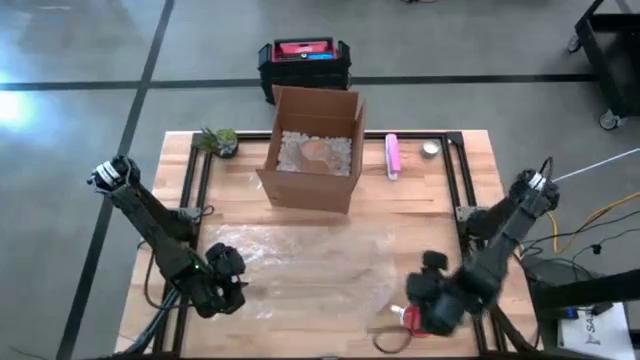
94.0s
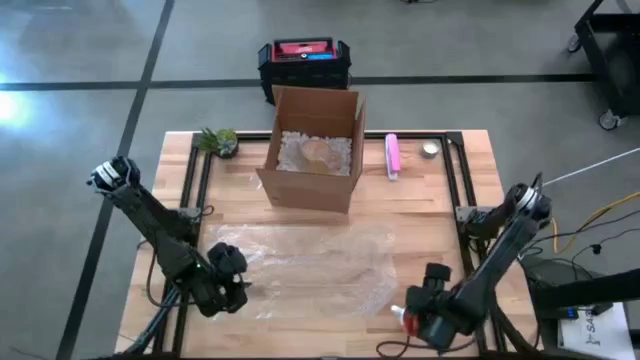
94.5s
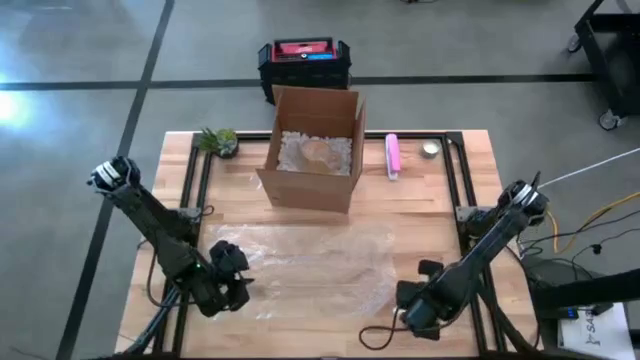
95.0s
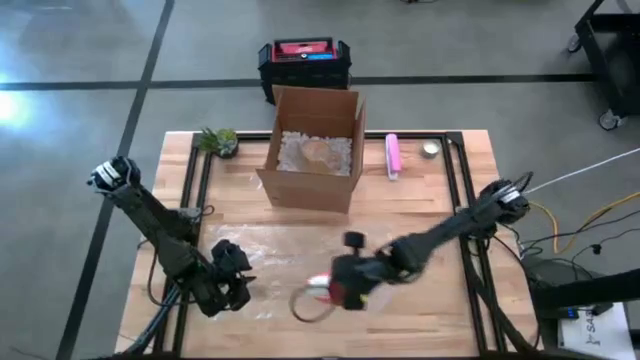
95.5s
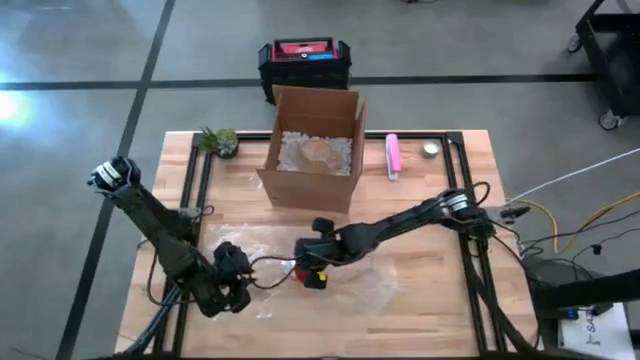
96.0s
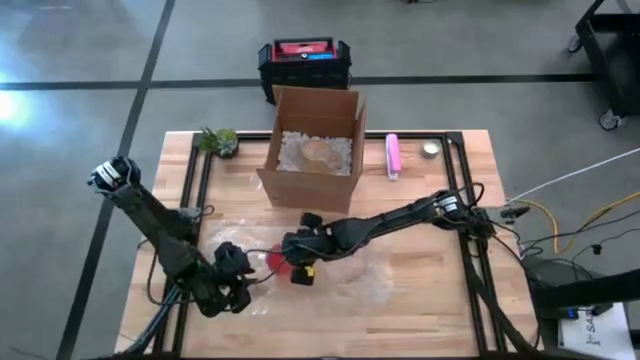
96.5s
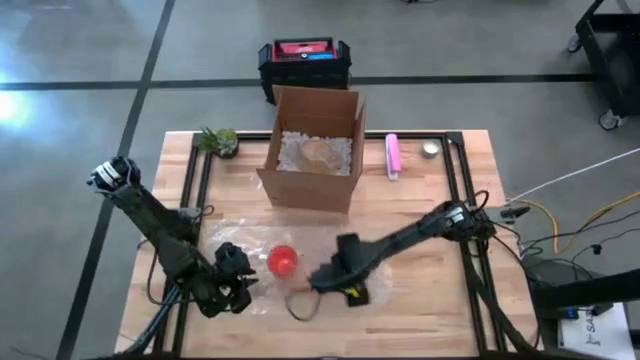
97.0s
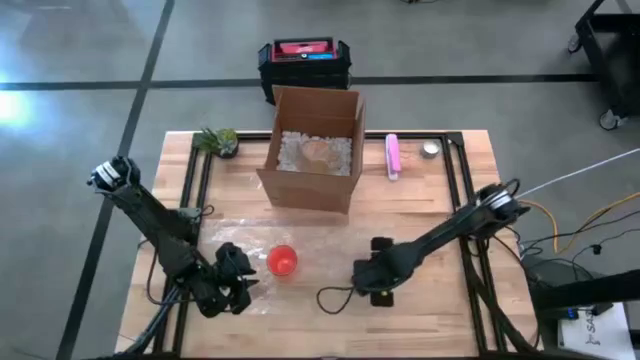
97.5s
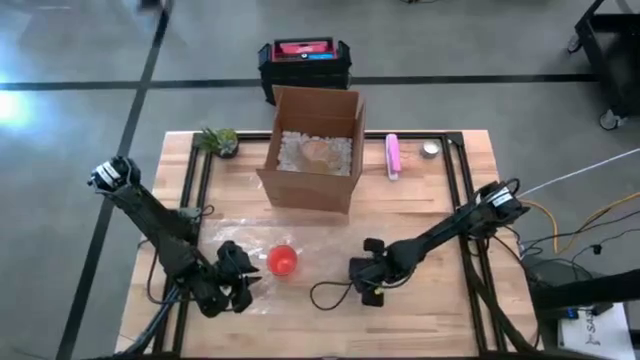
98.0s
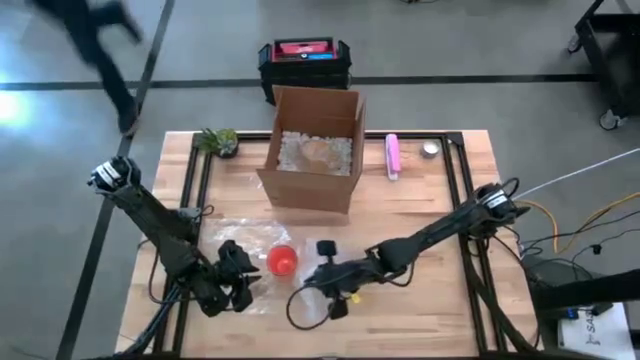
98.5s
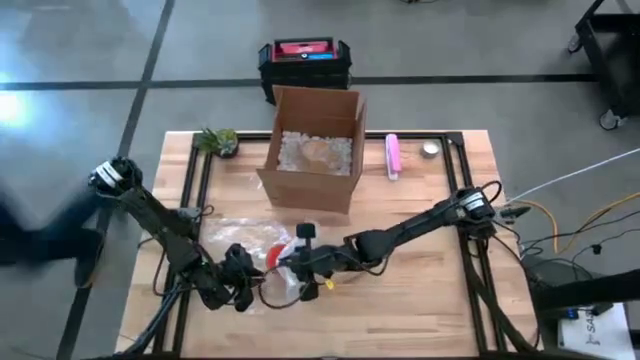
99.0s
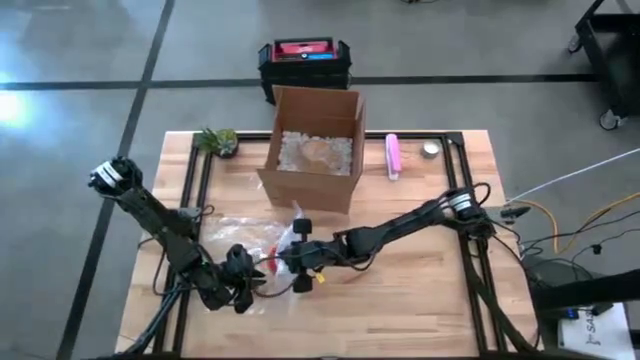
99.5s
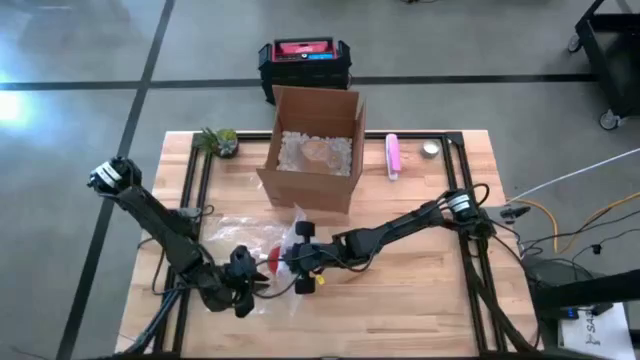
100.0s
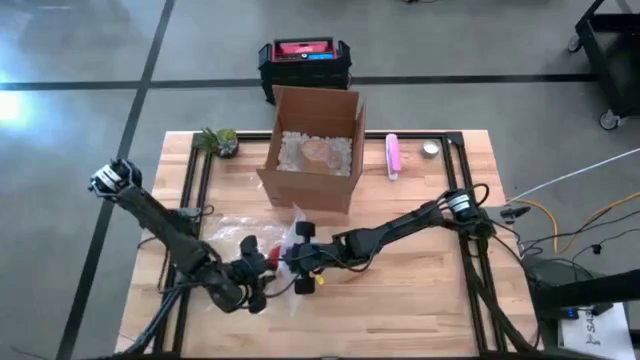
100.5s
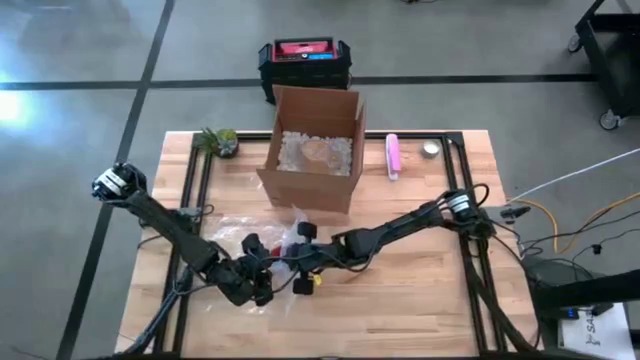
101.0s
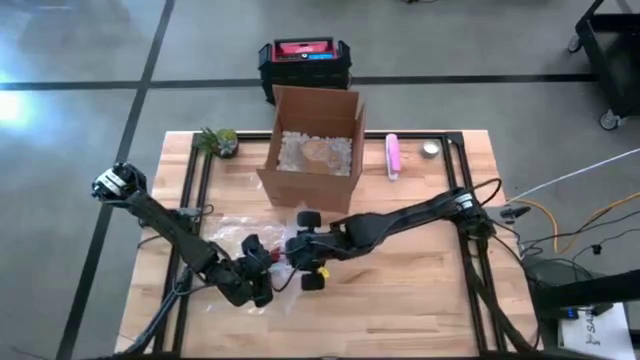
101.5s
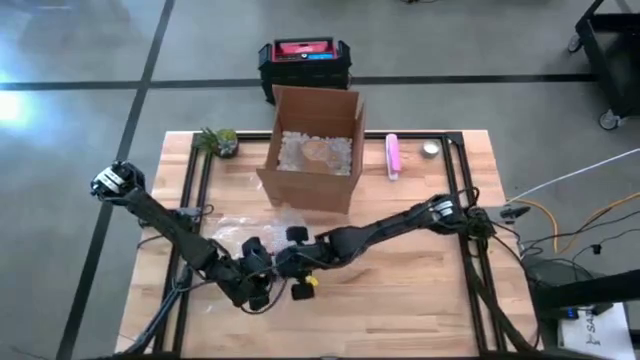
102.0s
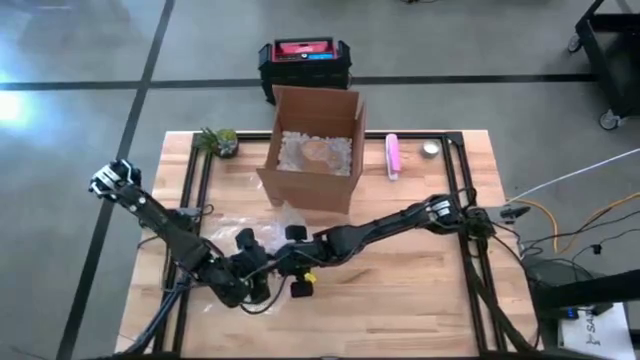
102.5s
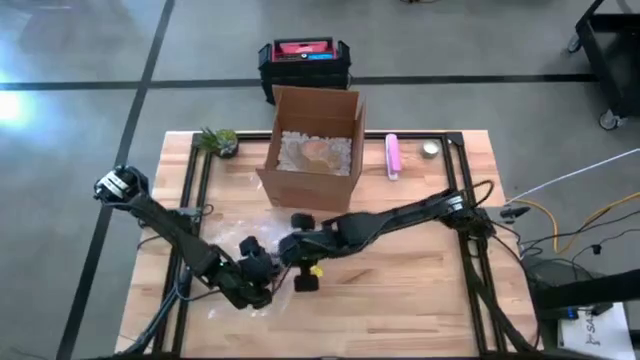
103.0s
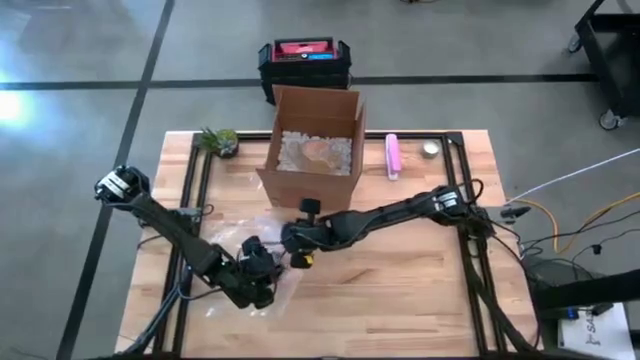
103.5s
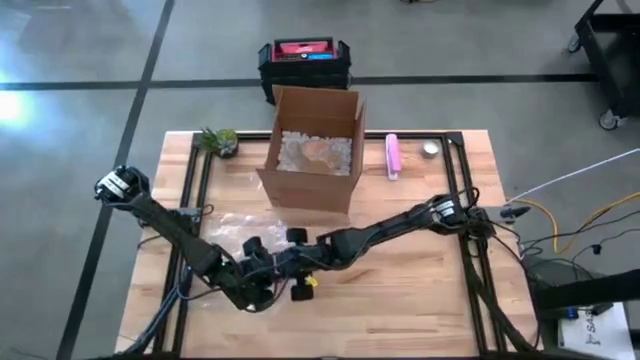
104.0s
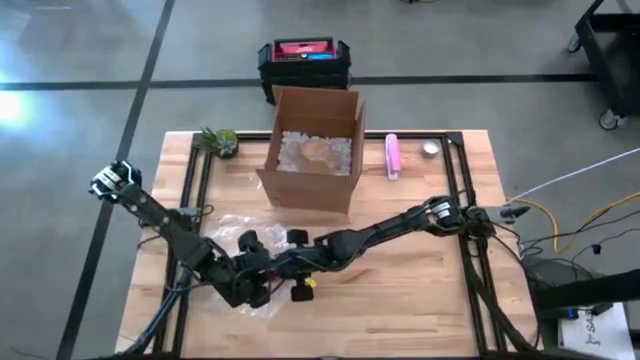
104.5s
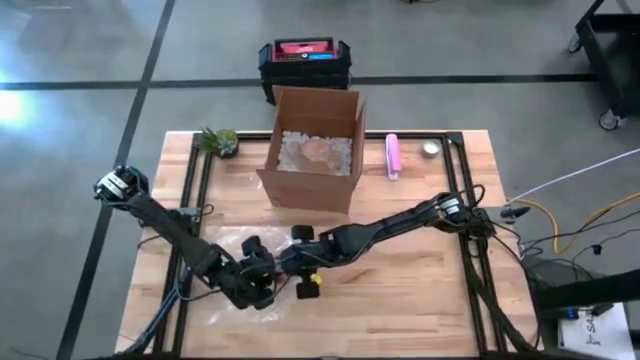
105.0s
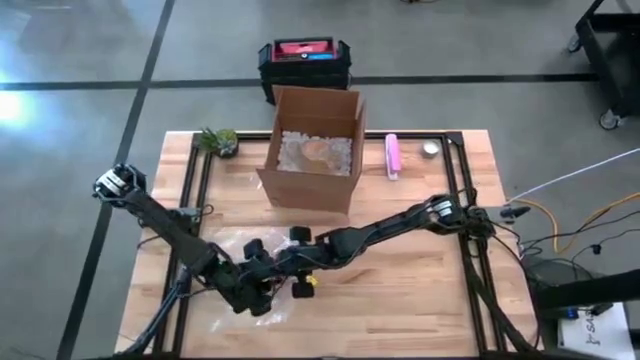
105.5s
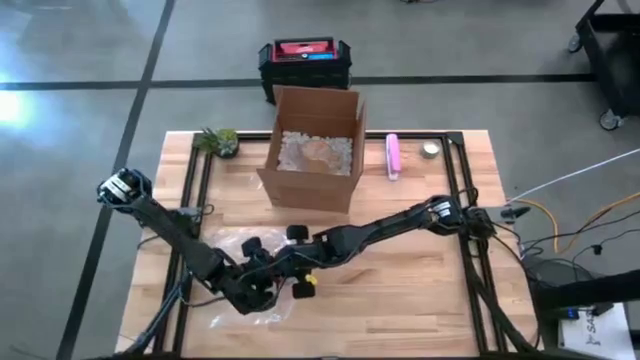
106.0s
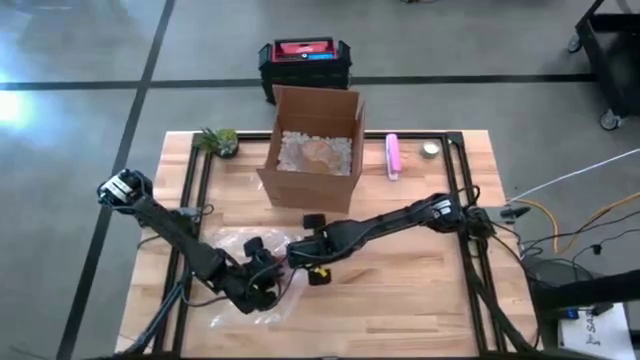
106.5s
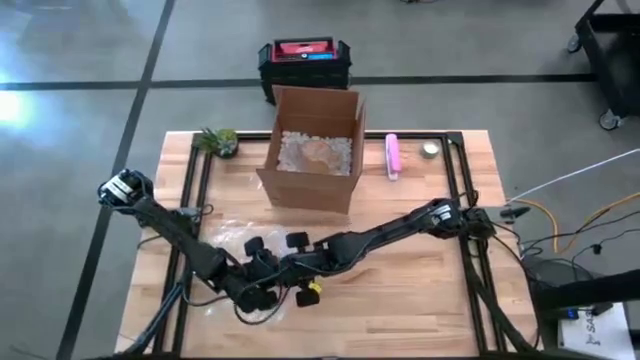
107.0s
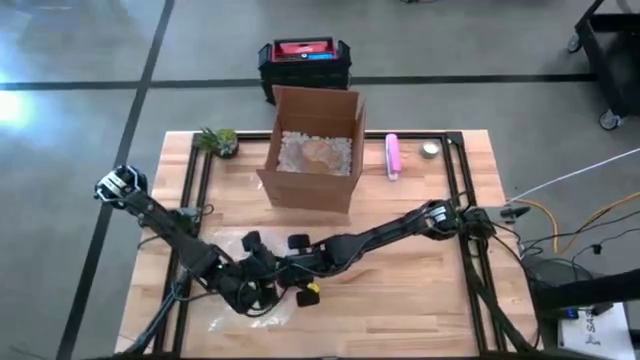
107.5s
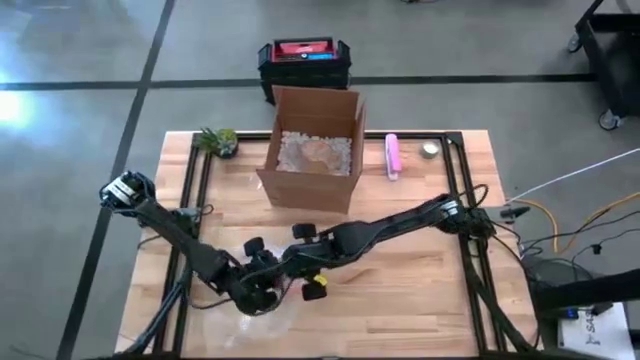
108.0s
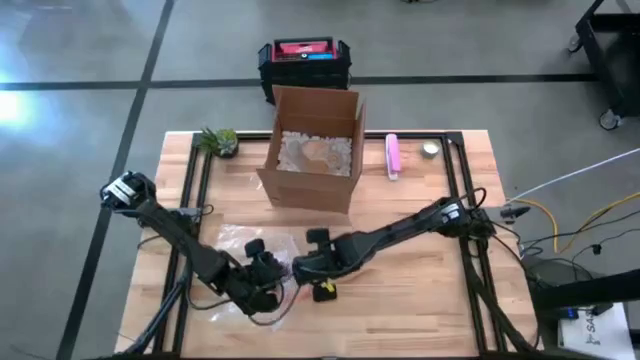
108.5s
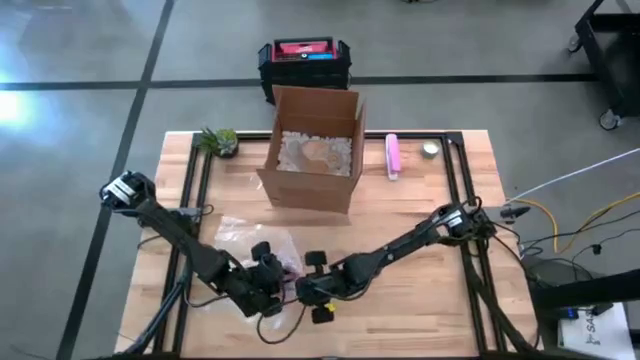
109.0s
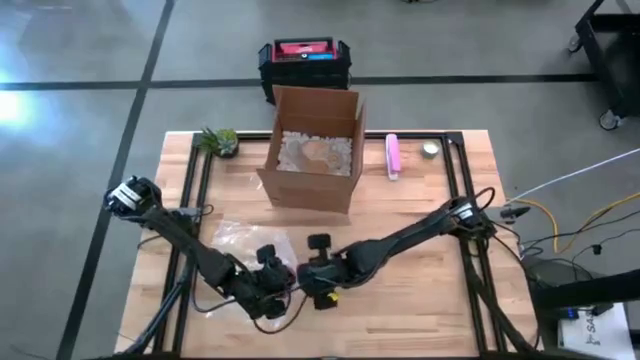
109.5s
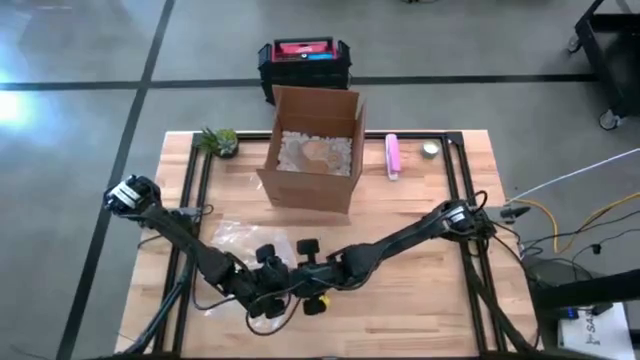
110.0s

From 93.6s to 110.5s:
Task: wrap mug
Wrap the orange mug with transparent bubble wrap

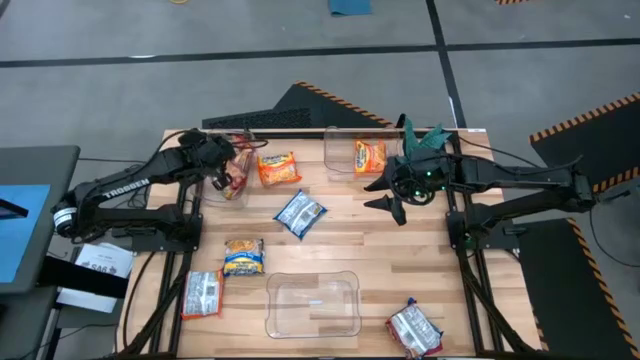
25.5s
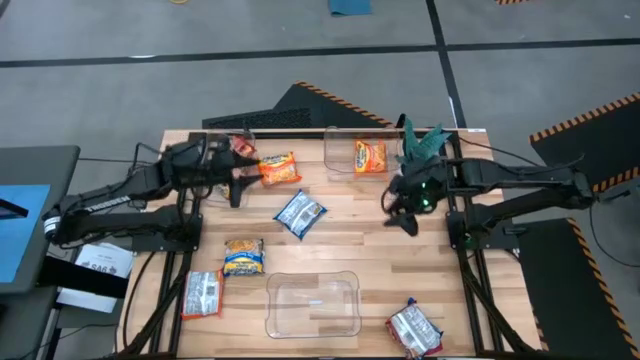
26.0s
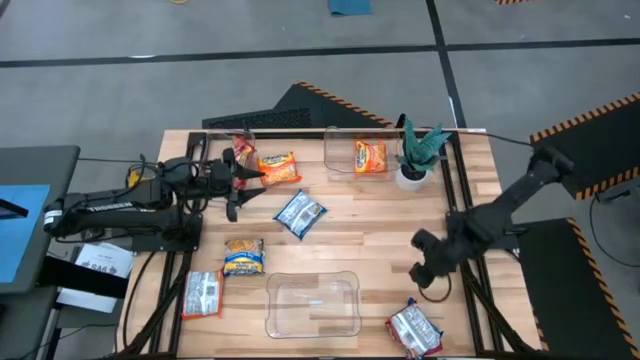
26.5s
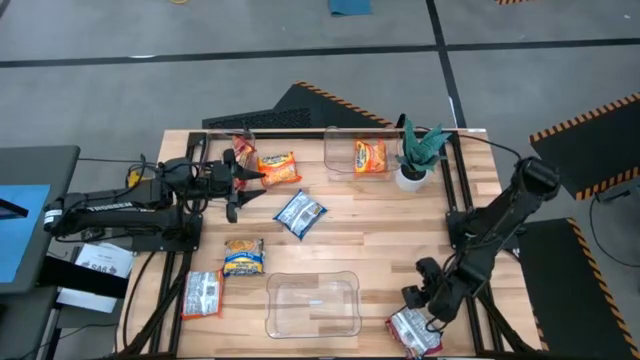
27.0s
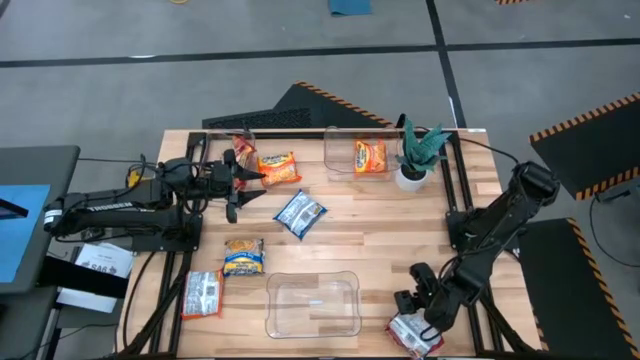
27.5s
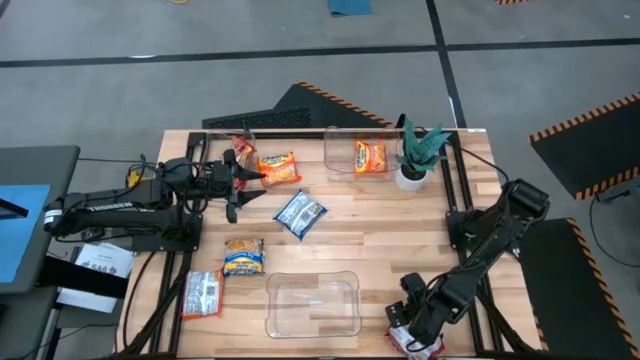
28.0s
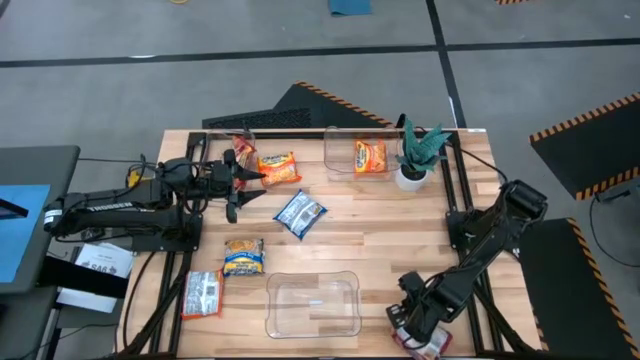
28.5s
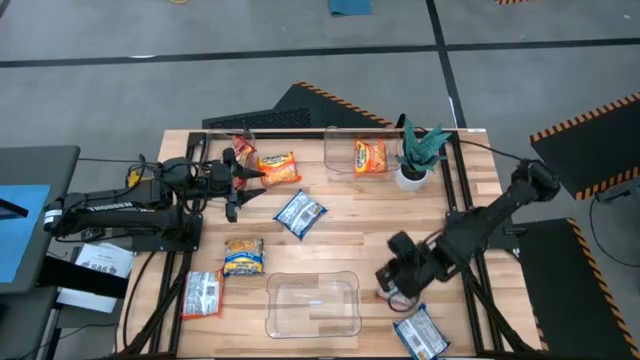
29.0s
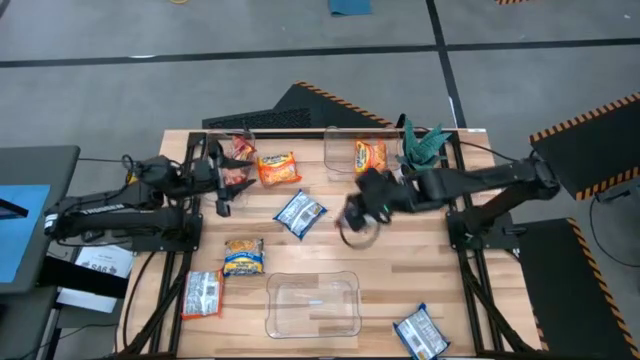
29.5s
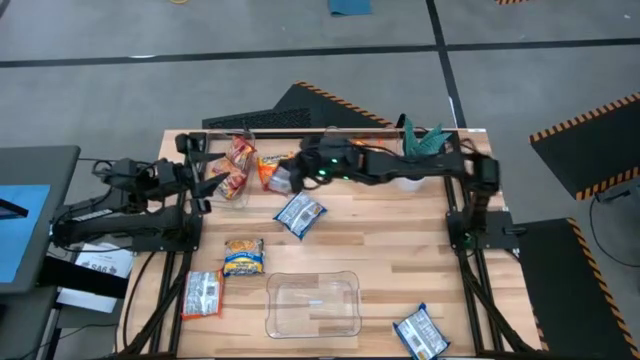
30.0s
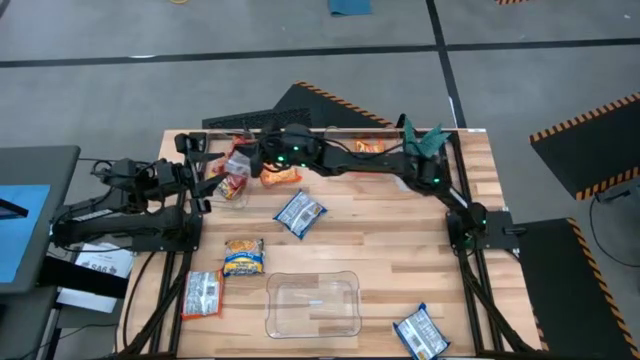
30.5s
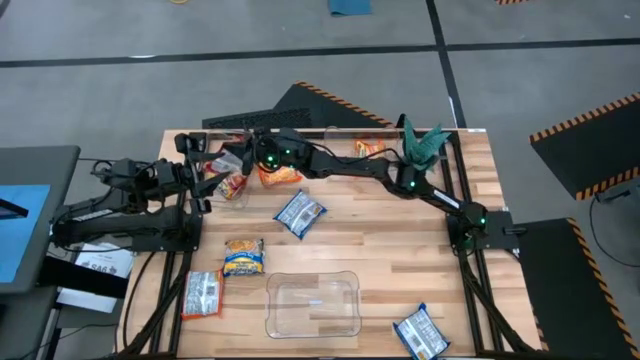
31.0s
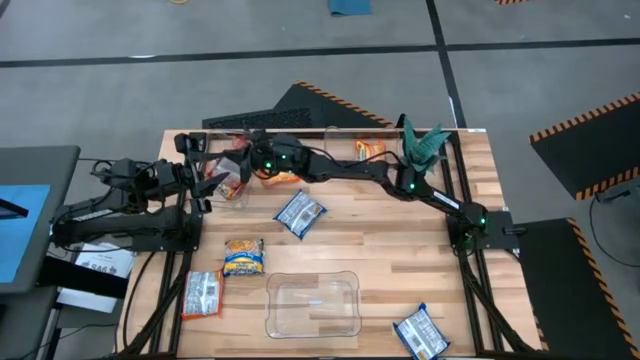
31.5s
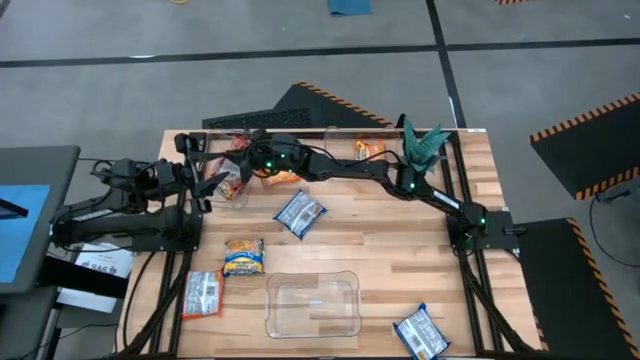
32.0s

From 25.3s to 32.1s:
Task: Sort Maruchan noodles
Put the red noodle pack into the top left transparent bin
